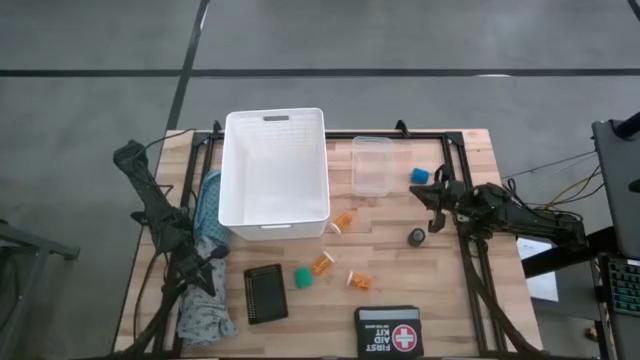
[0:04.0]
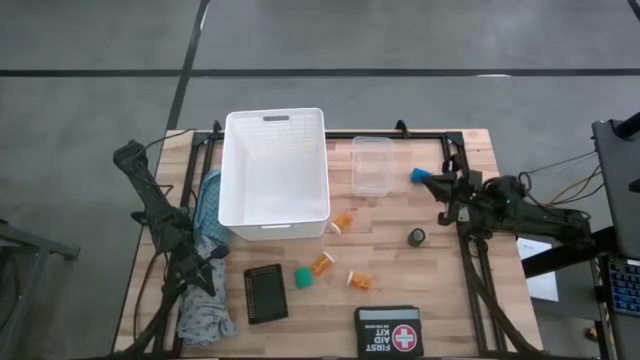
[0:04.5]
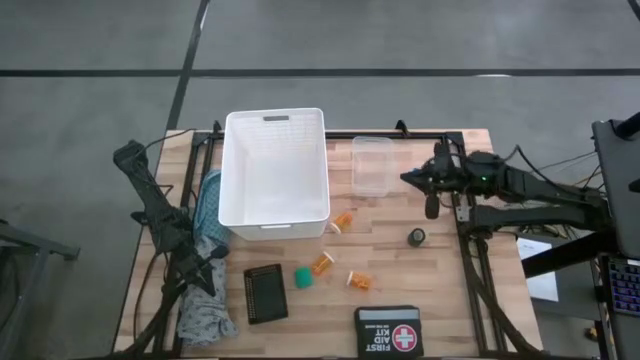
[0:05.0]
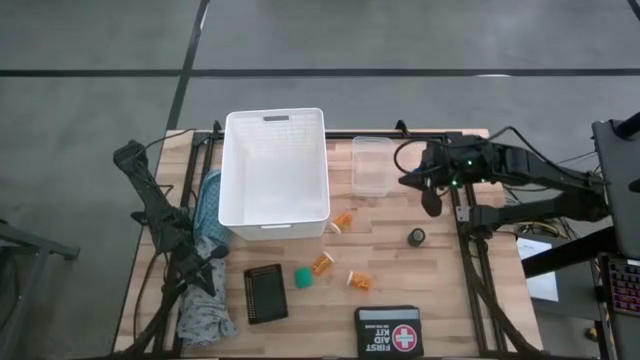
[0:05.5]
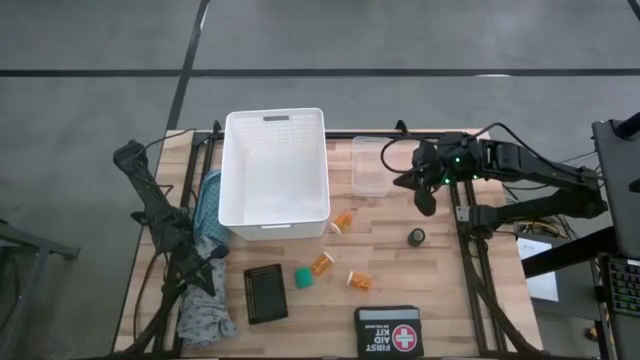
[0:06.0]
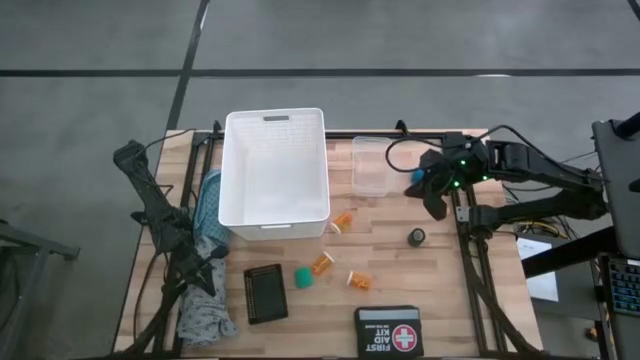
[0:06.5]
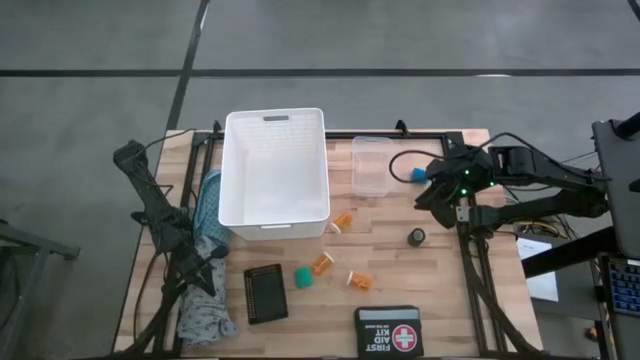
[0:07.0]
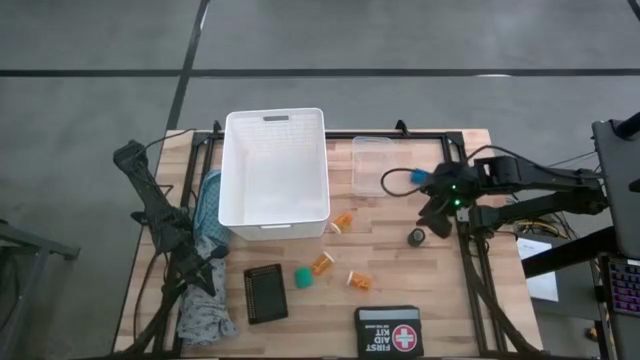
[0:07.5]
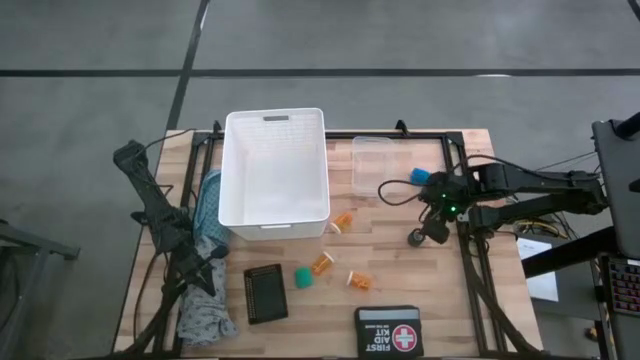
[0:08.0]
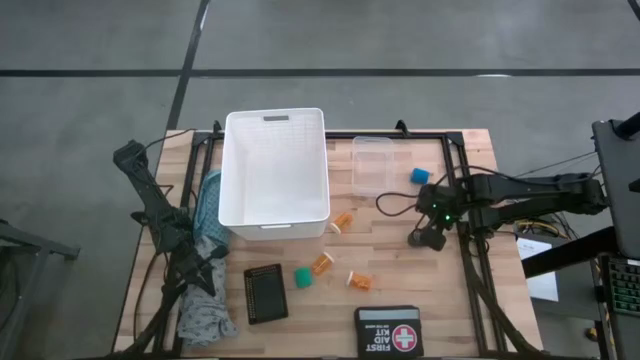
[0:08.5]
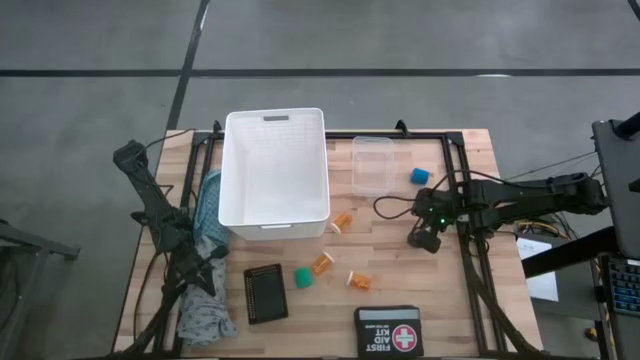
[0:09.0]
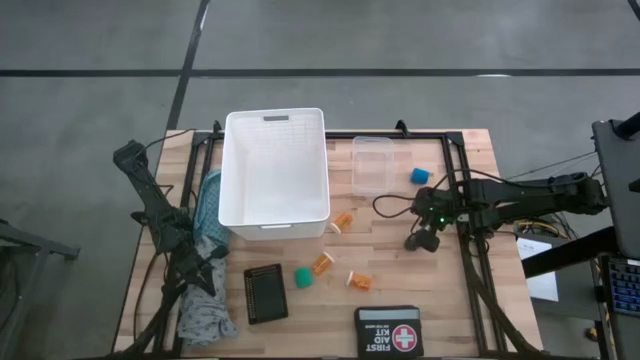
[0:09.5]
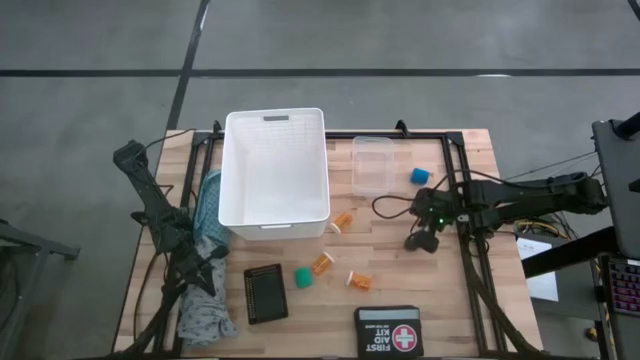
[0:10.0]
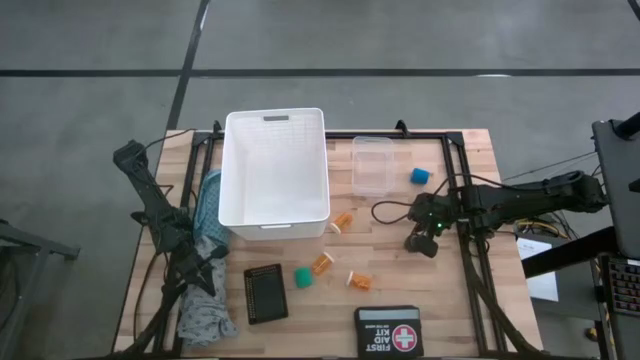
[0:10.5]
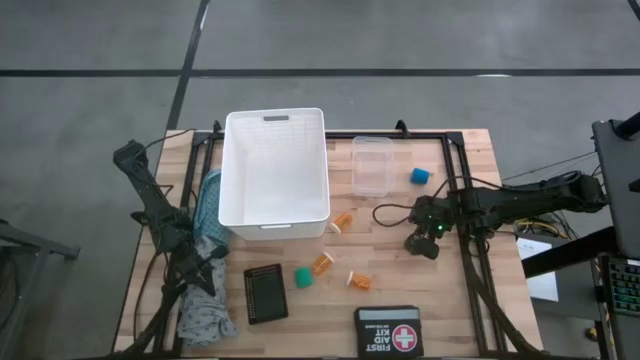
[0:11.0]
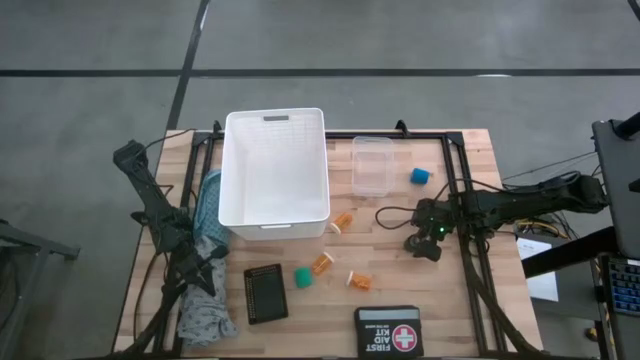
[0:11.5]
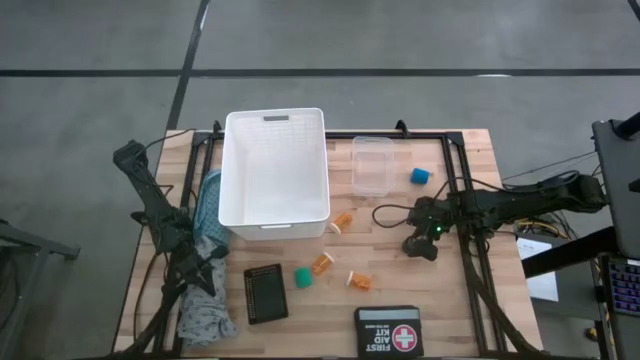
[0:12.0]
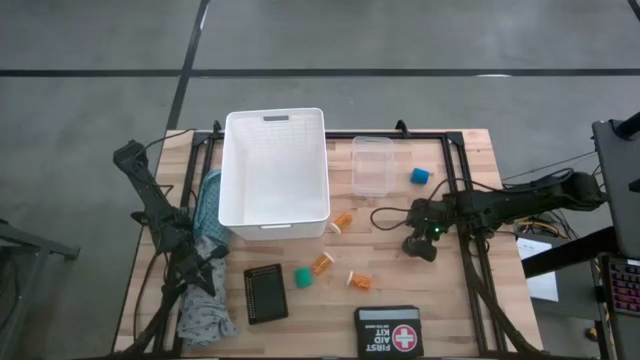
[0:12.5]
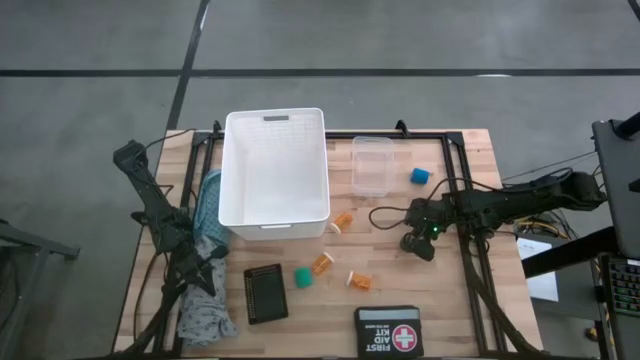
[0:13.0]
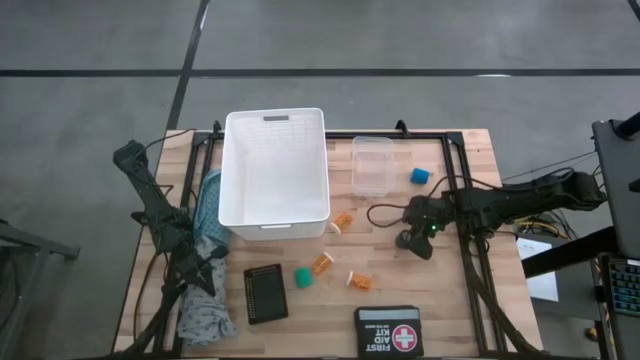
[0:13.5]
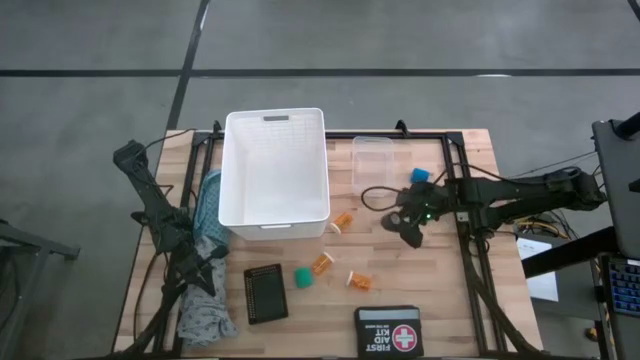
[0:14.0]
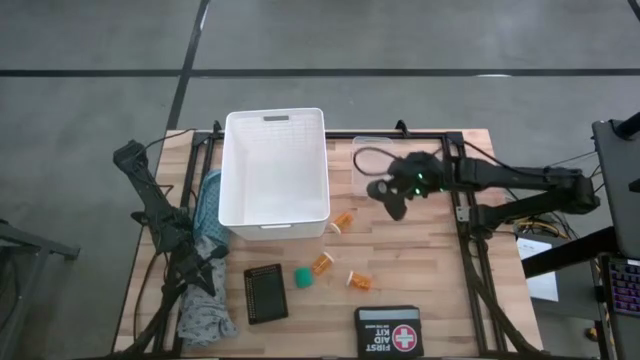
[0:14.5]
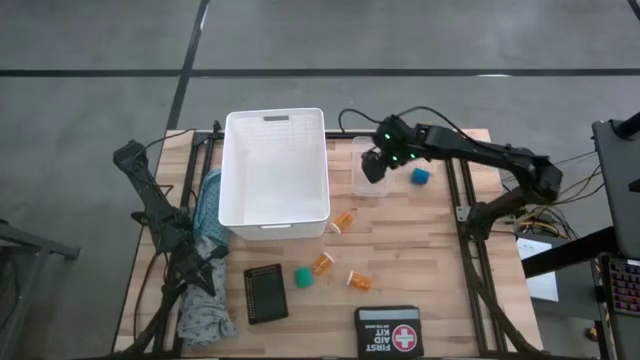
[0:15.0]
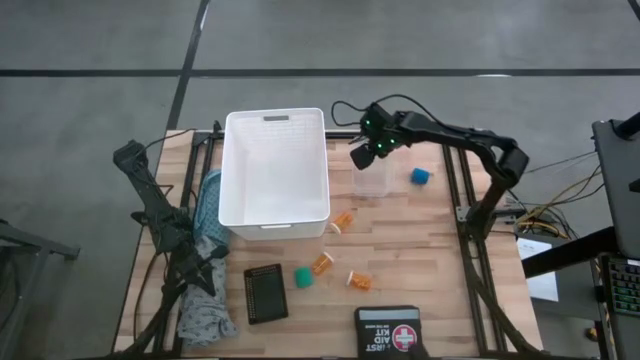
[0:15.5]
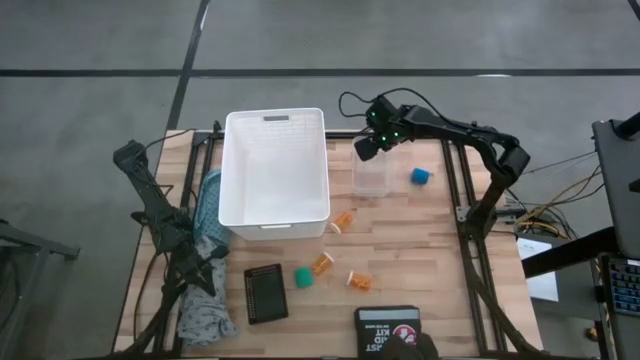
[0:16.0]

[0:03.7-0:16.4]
Task: Pick & place medical supplies in basket/bin
Put the black roll bandage into the transparent bin

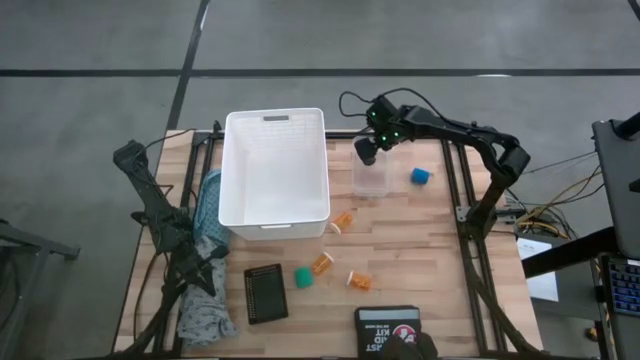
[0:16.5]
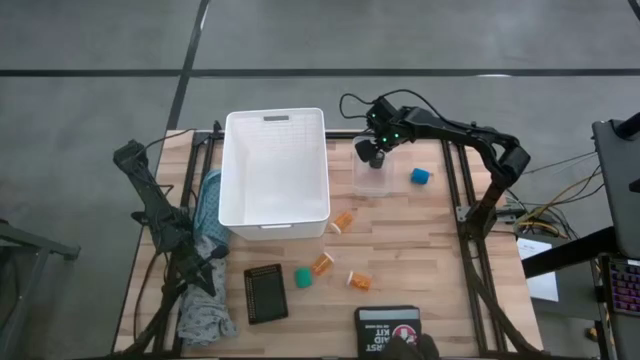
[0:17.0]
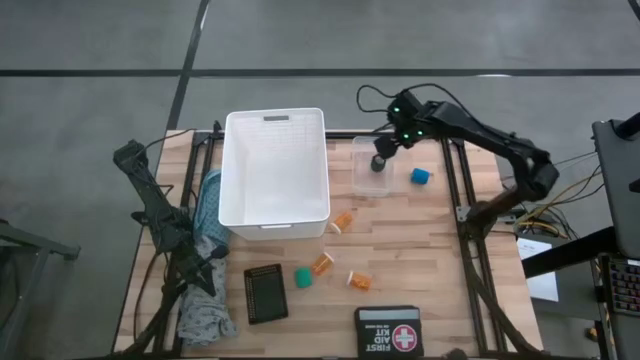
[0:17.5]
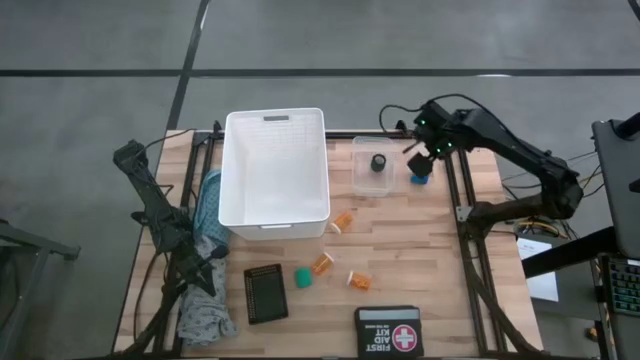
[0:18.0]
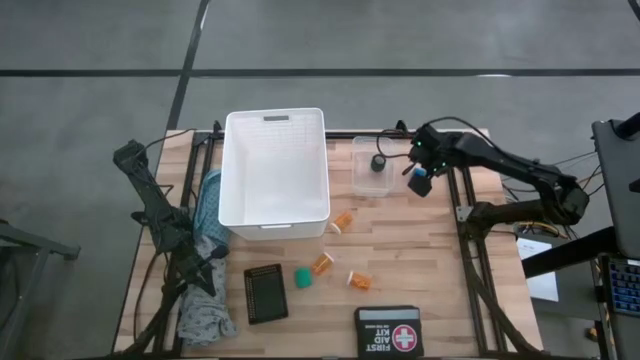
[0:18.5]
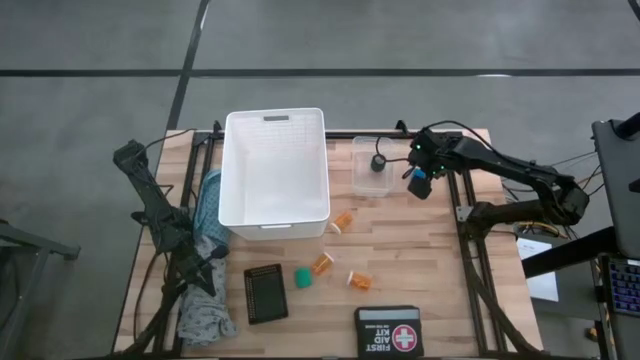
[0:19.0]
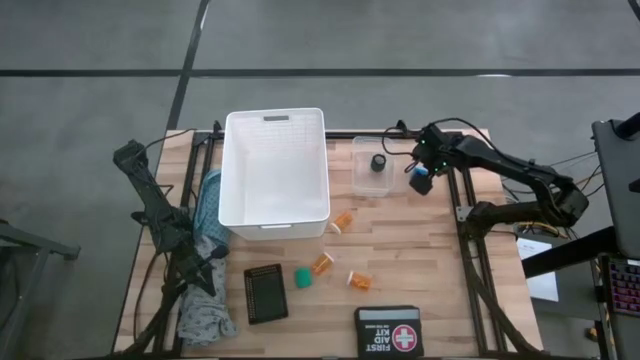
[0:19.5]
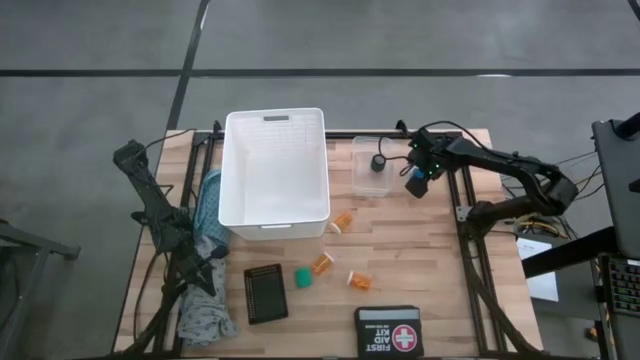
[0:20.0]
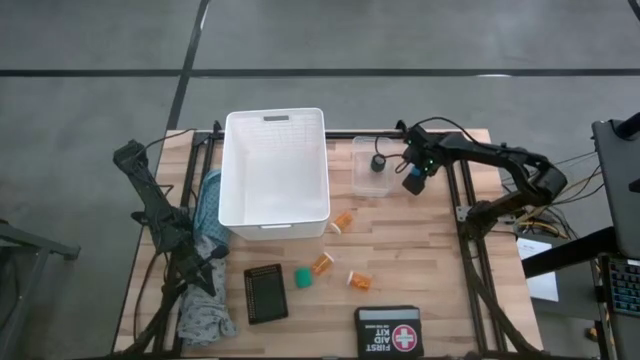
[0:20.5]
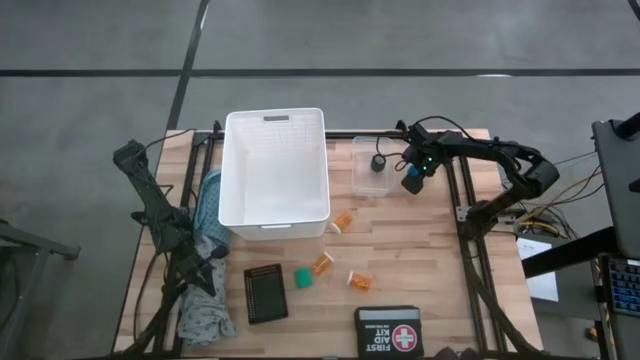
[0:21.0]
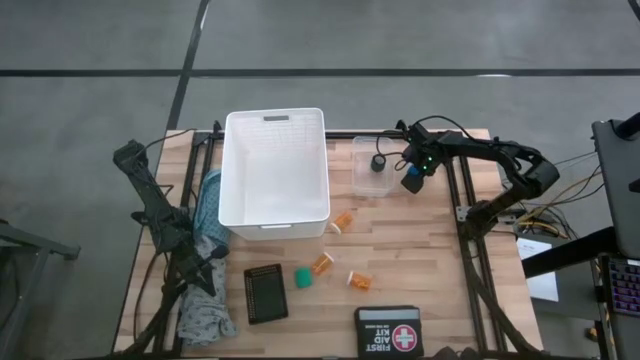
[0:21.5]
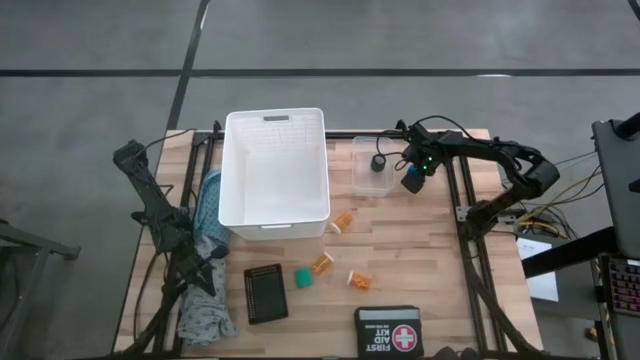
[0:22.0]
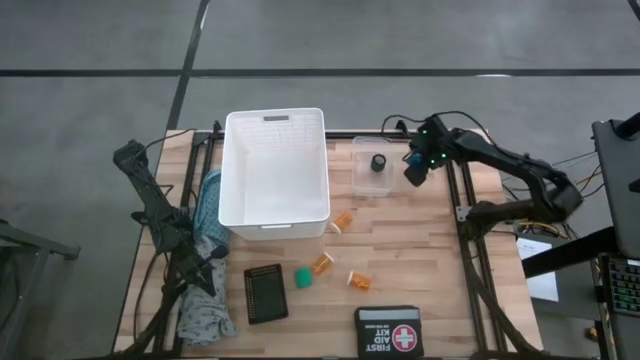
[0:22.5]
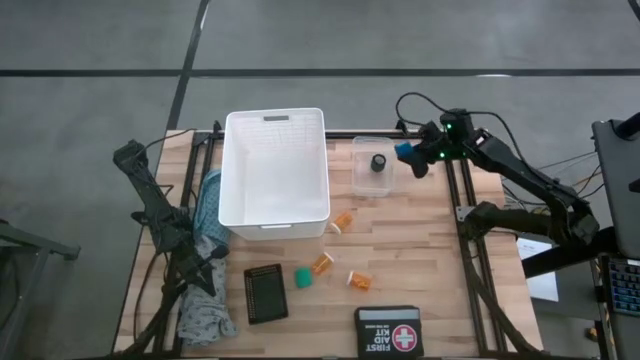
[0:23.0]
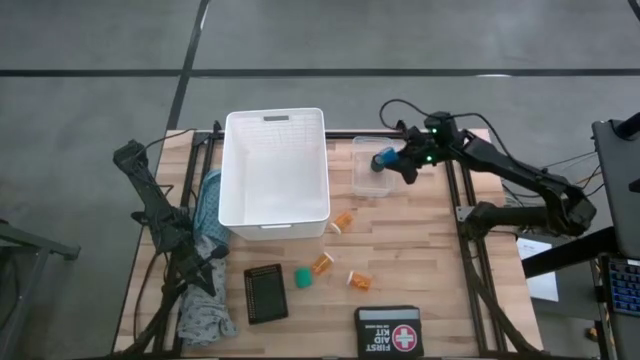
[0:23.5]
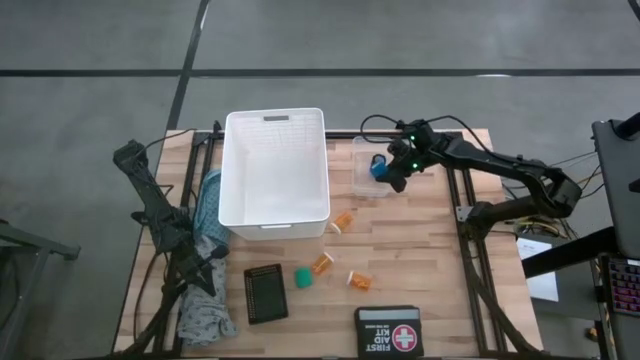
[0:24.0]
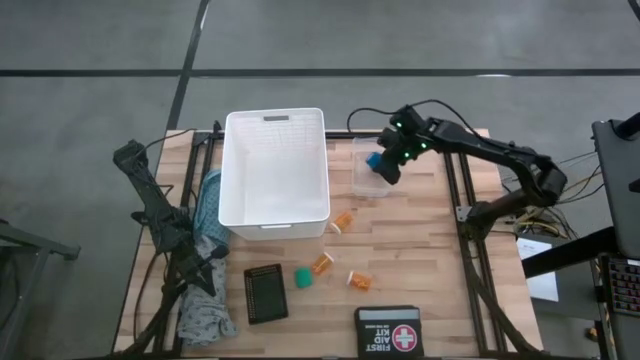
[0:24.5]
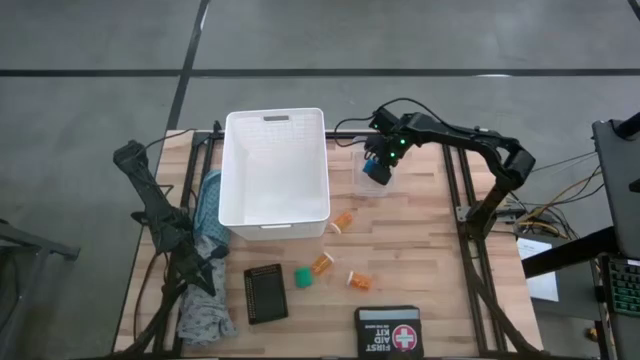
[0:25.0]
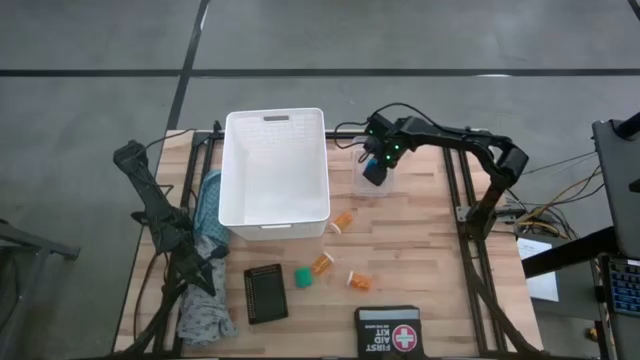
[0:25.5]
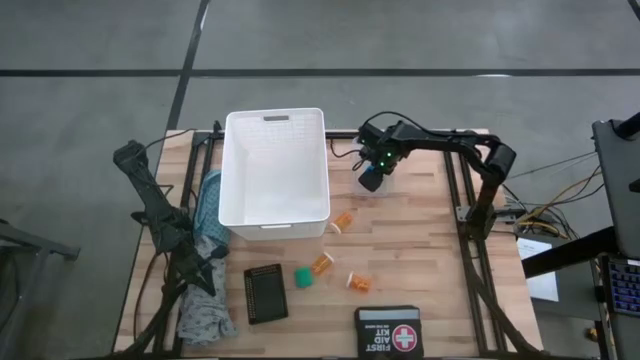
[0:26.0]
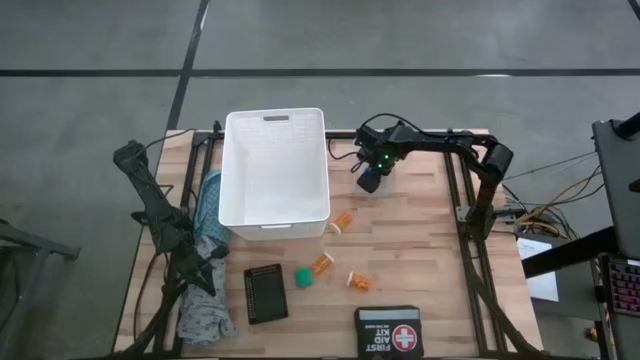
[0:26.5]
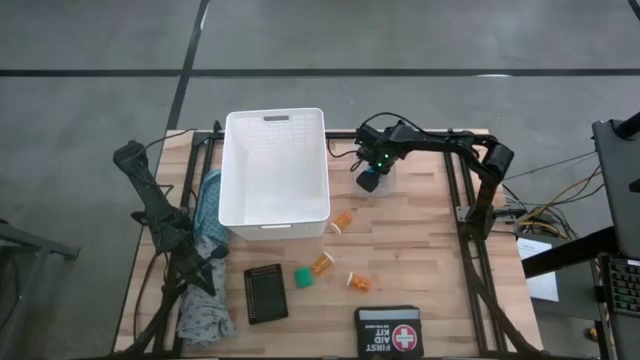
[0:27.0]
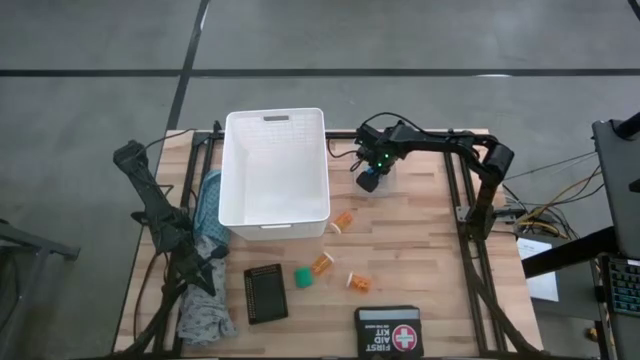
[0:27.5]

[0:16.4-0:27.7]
Put the blue roll bandage into the transparent bin
